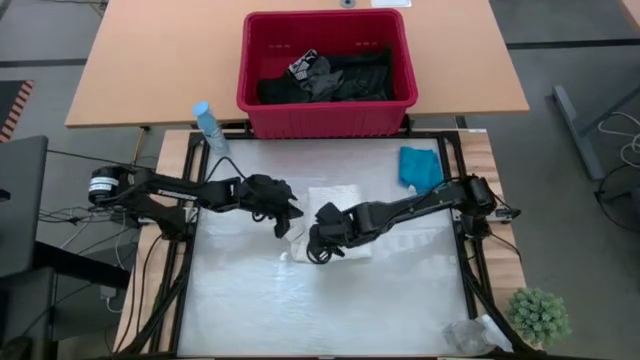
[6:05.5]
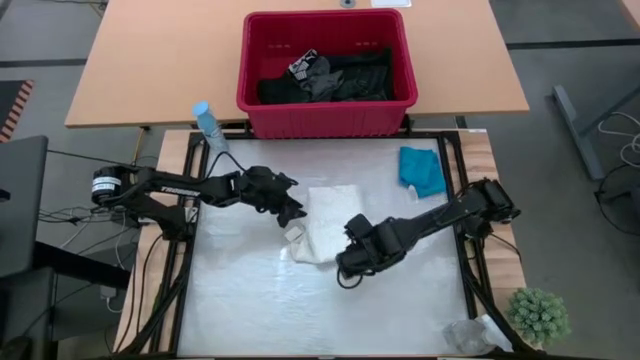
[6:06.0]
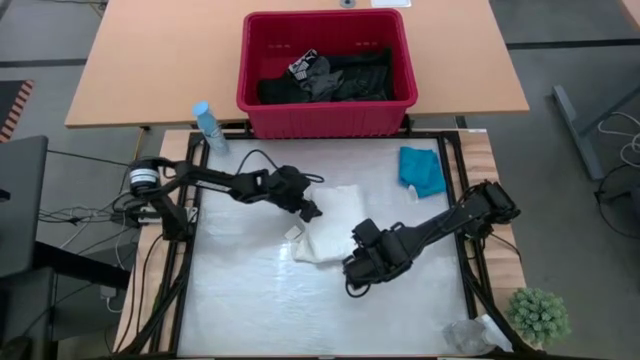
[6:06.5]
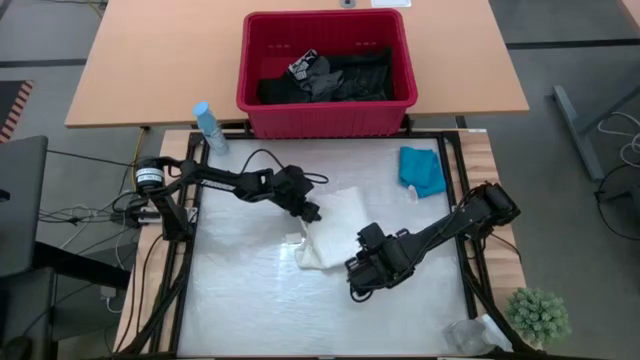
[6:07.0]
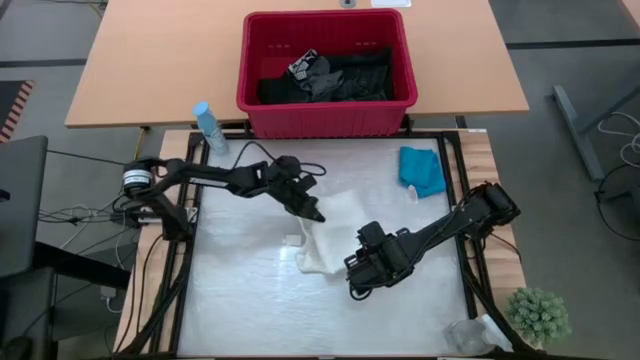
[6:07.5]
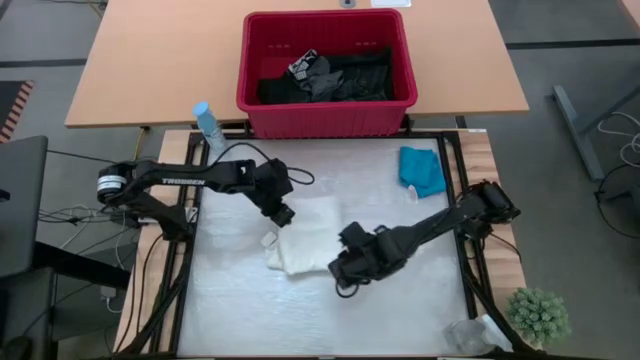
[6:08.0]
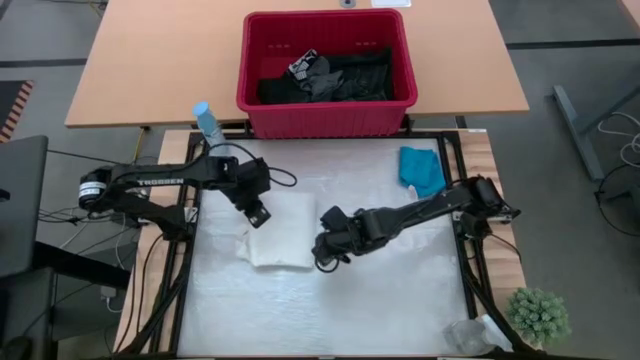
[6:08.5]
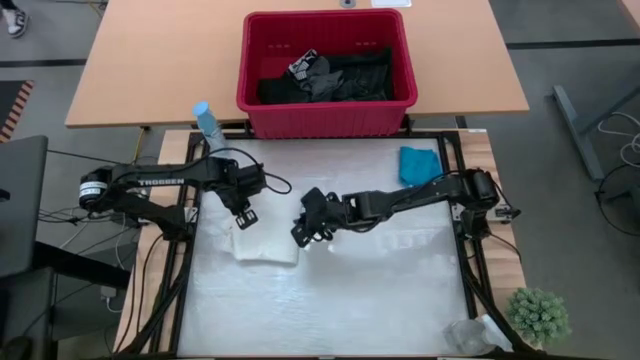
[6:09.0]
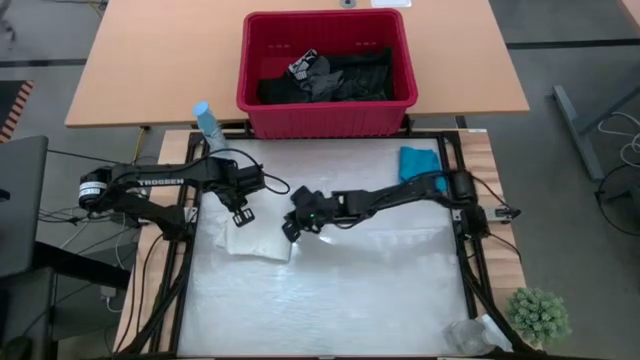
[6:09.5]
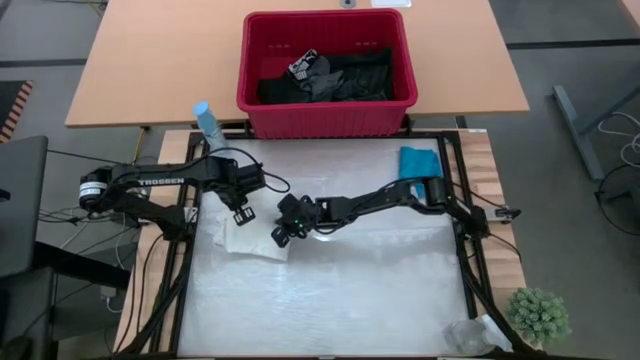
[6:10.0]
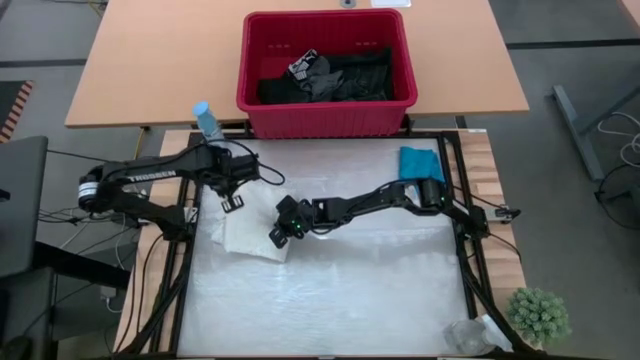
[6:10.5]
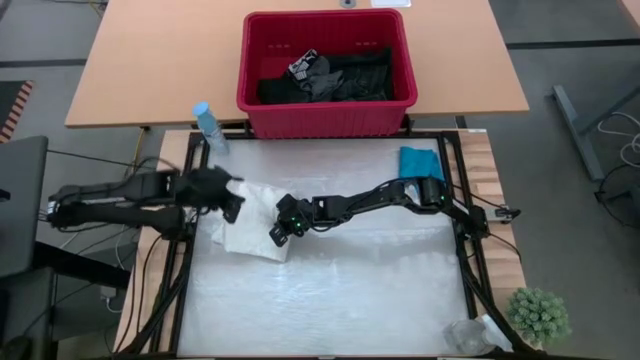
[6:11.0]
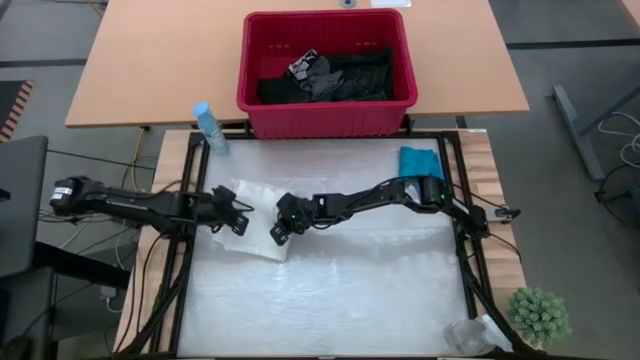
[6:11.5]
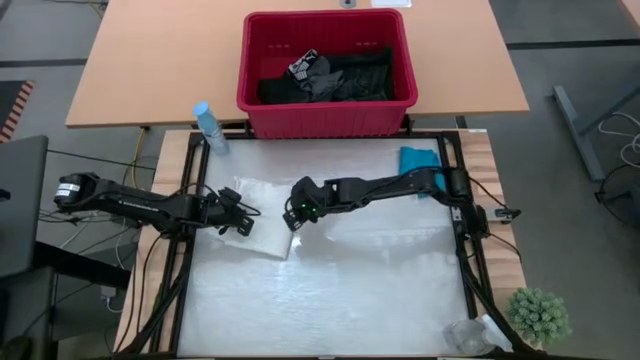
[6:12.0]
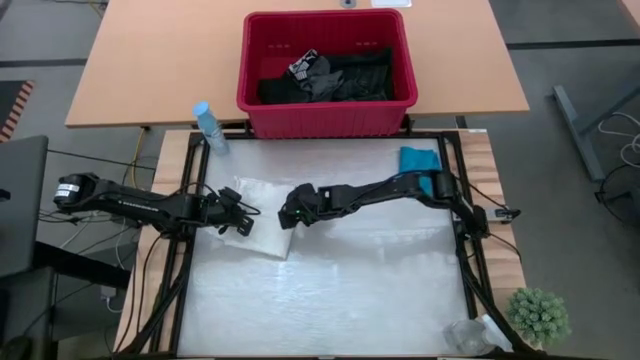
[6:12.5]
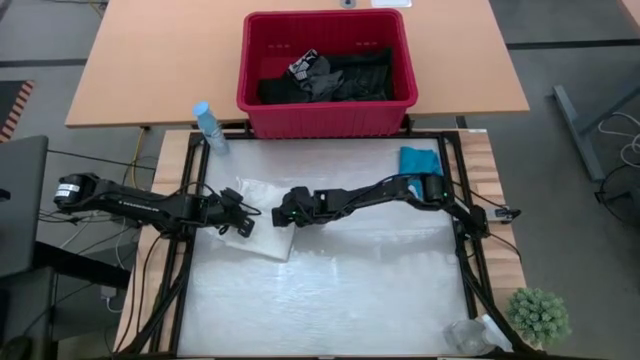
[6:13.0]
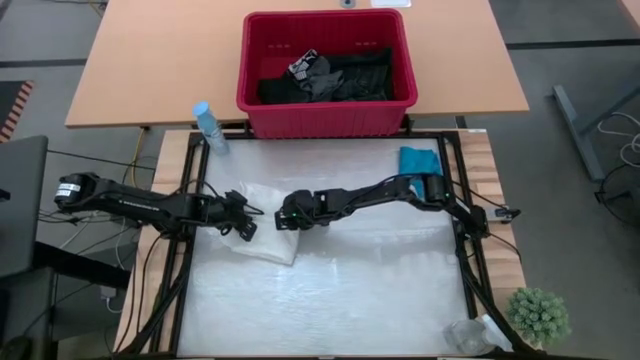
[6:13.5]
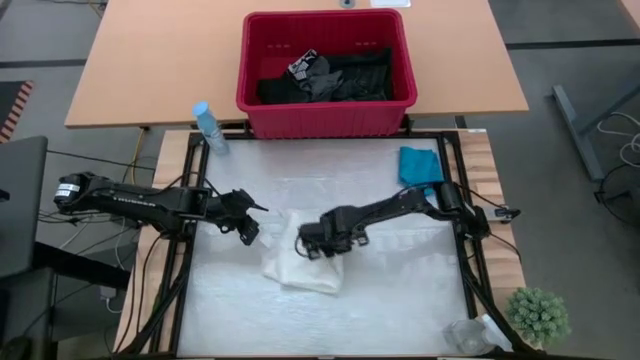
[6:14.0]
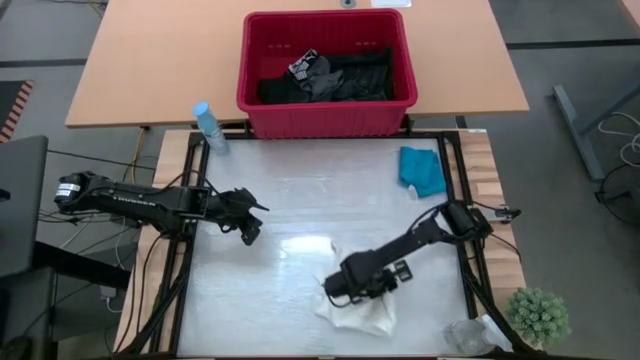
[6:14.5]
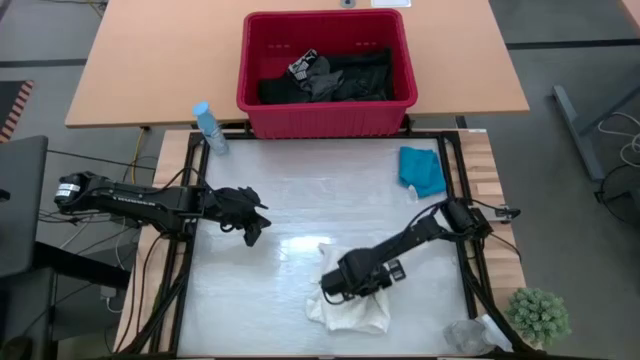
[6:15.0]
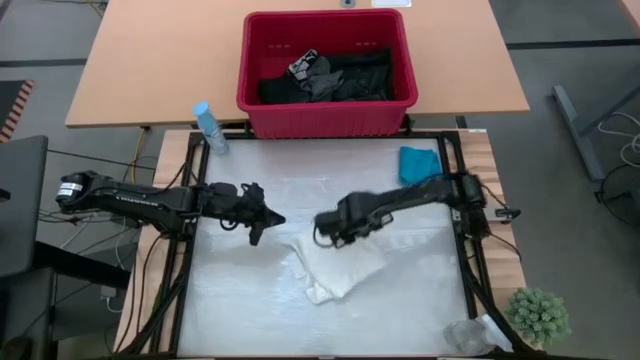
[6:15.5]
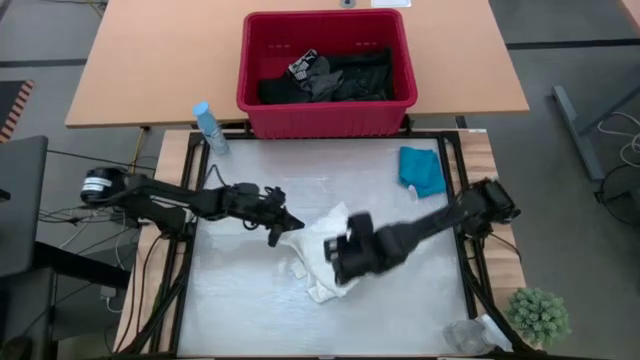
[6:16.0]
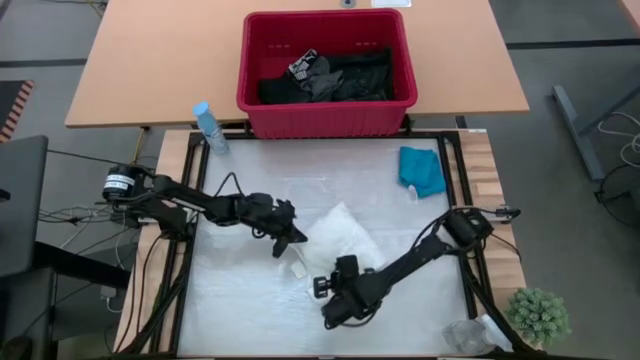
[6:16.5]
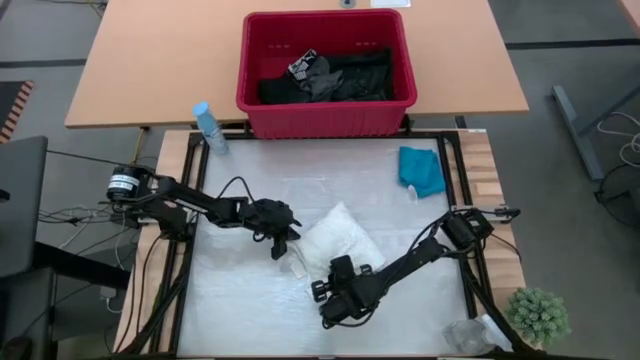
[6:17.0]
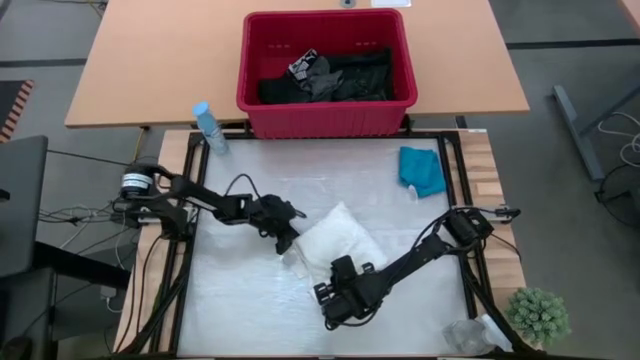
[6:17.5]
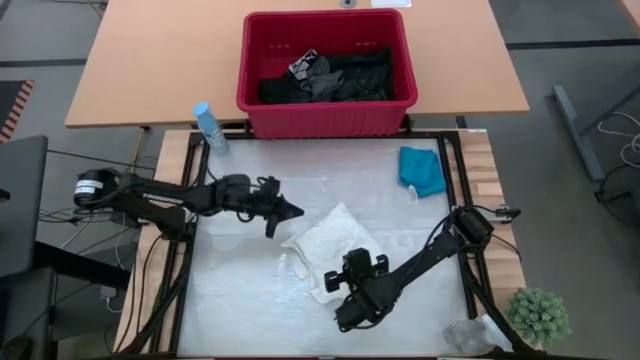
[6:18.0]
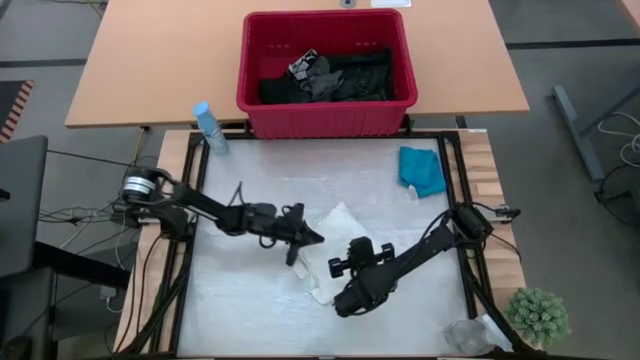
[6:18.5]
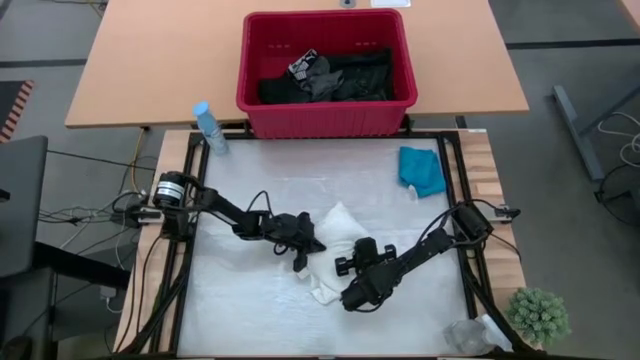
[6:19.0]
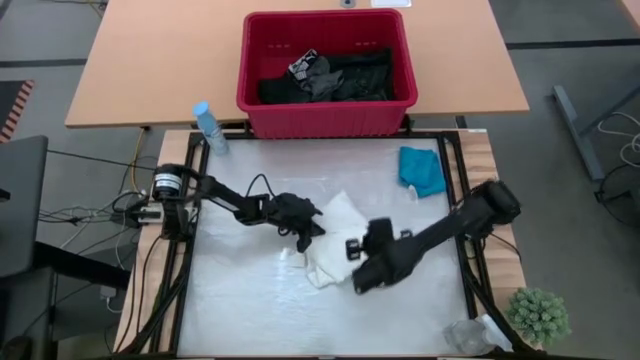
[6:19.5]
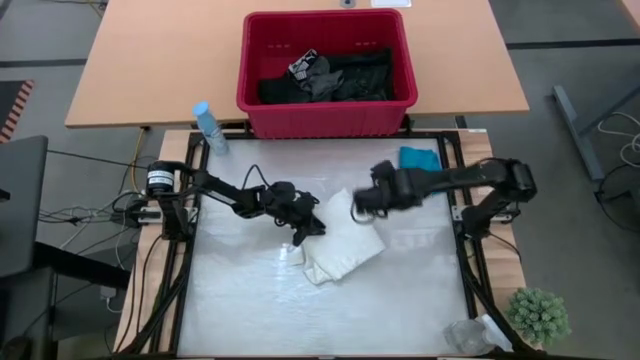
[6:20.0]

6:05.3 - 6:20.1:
Task: Fold laundry
Fold the white shirt

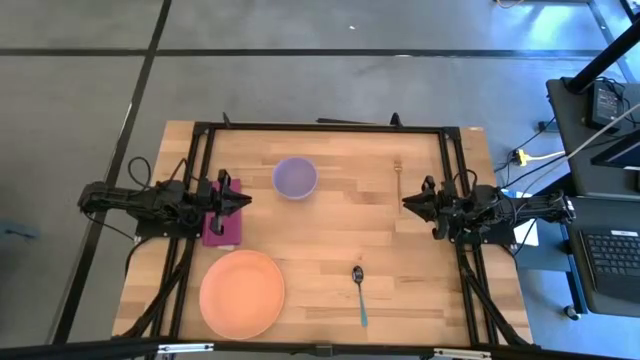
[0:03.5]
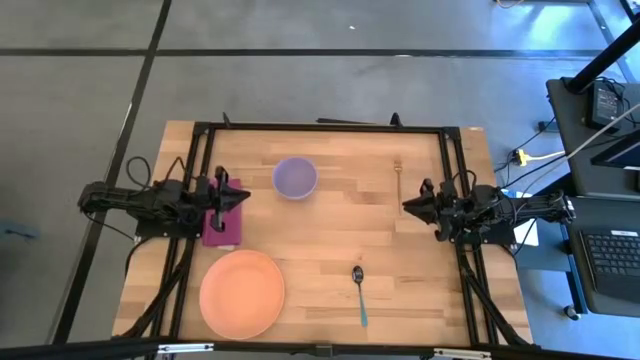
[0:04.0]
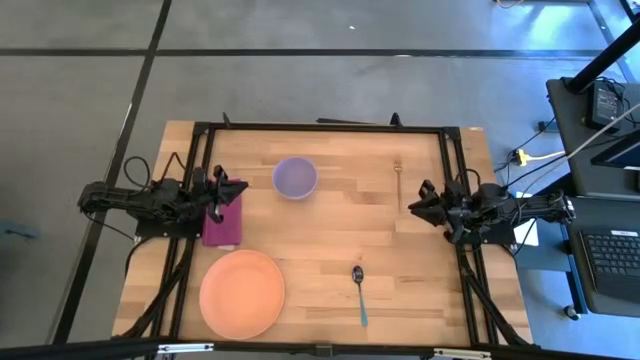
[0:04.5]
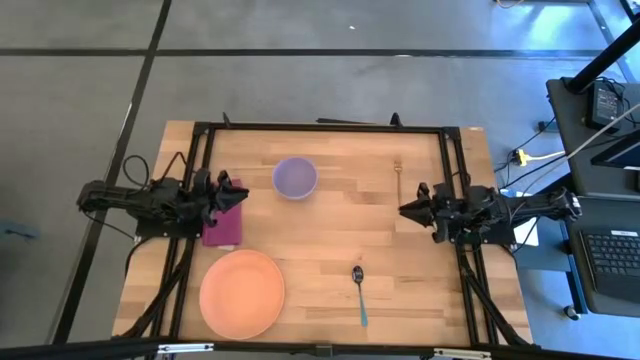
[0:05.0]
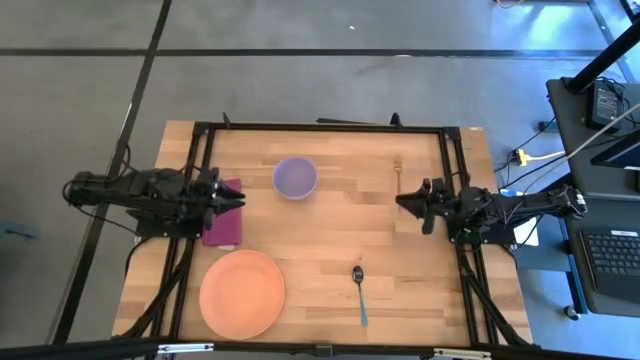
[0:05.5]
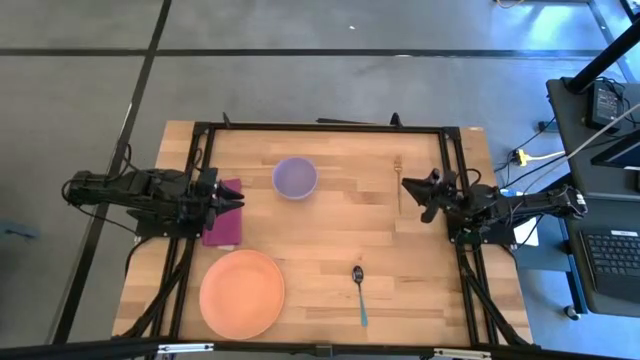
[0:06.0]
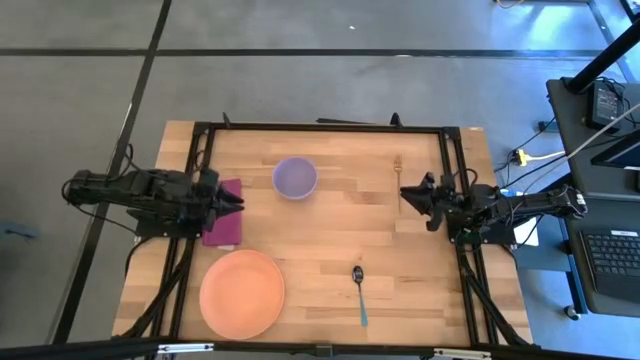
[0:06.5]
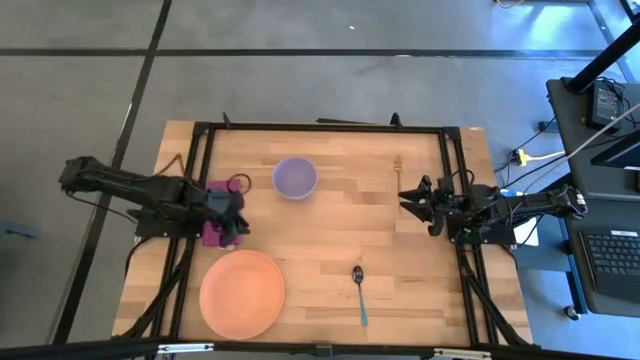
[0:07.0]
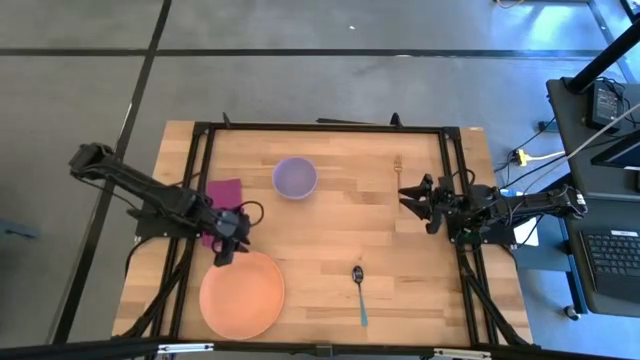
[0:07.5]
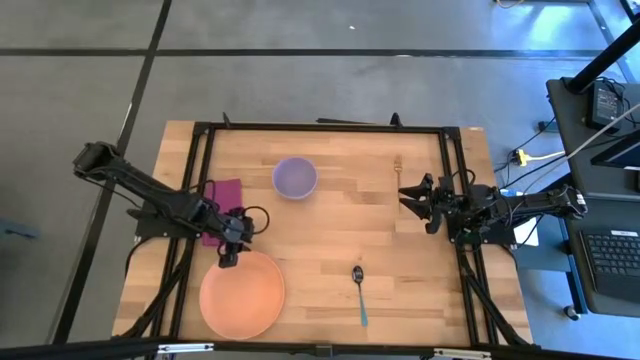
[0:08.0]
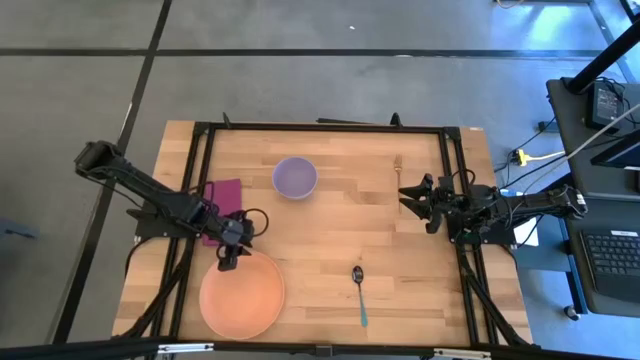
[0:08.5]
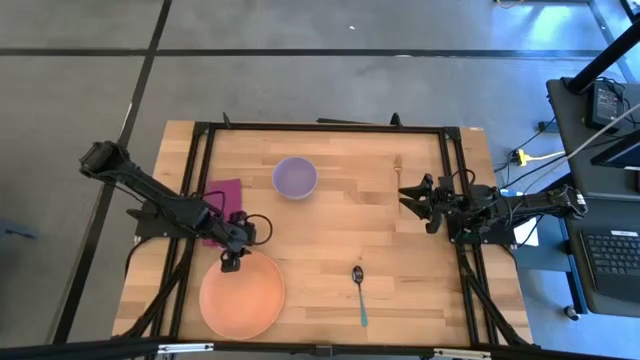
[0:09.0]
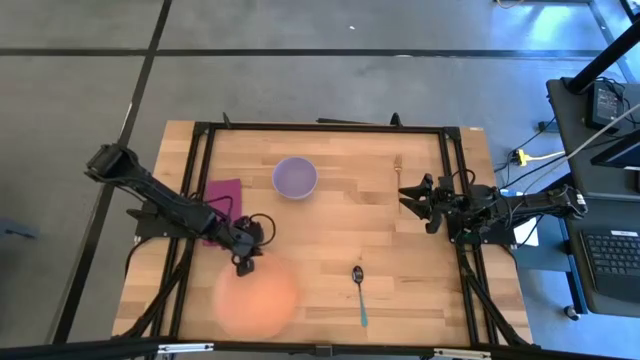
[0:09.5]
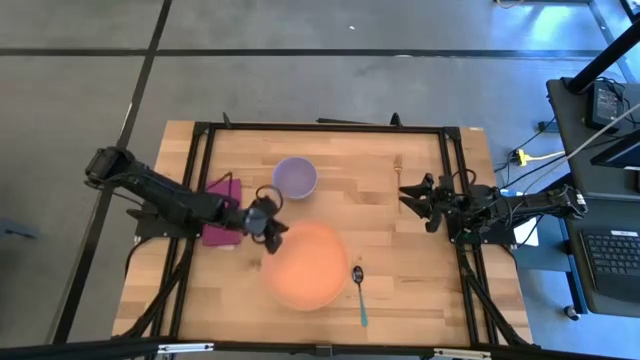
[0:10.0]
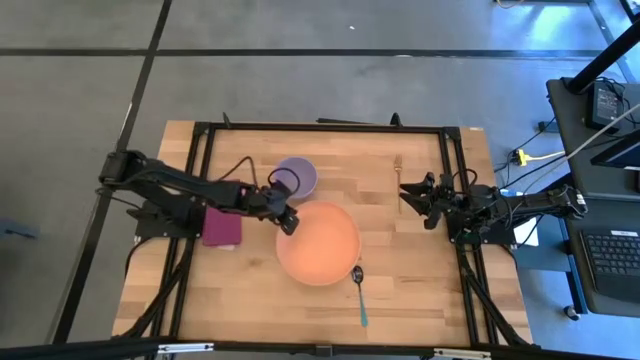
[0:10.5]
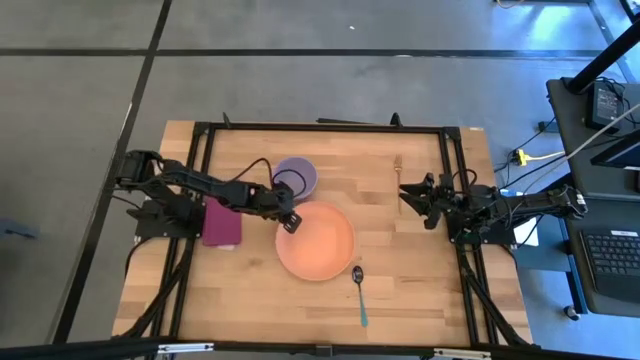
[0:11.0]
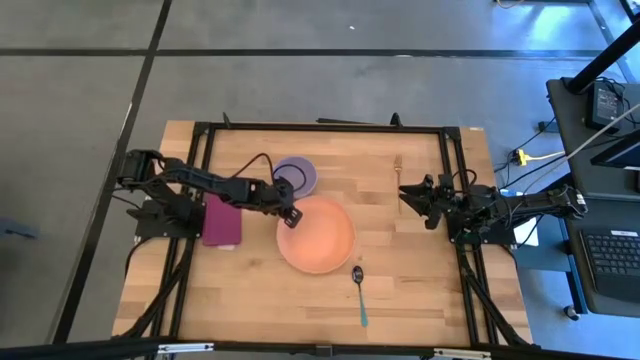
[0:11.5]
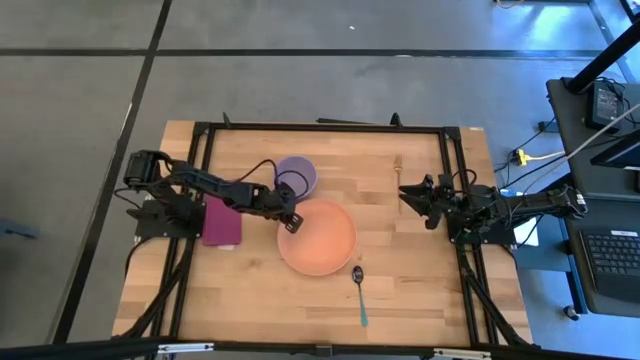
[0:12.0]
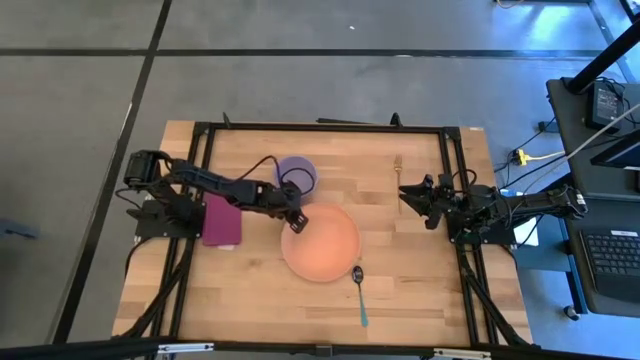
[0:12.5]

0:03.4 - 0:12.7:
Task: Set table place
Move the orange plate to the center of the table
